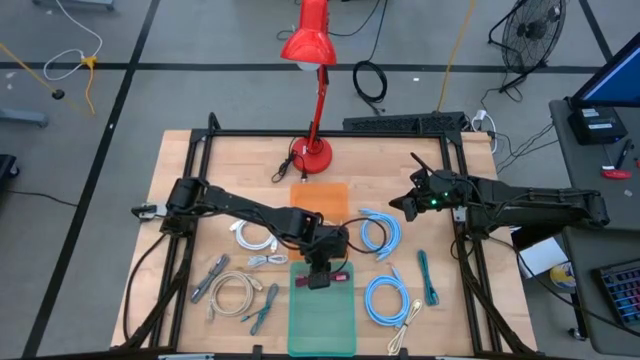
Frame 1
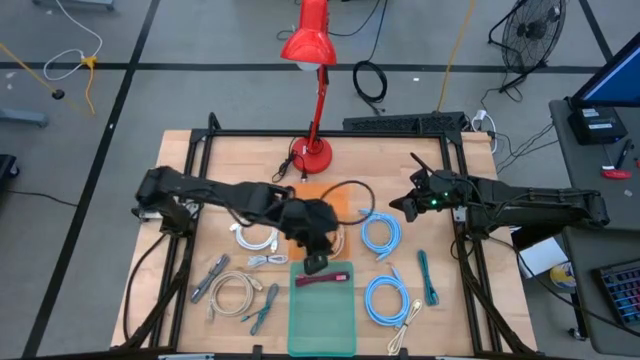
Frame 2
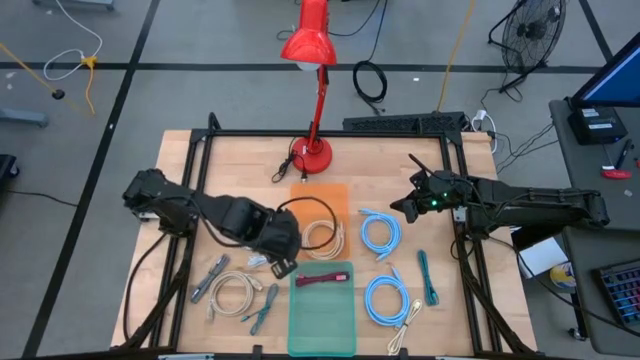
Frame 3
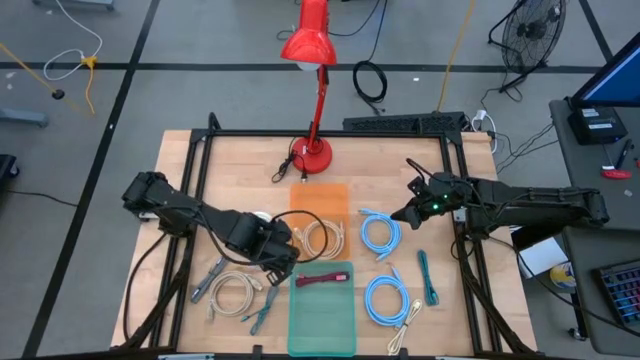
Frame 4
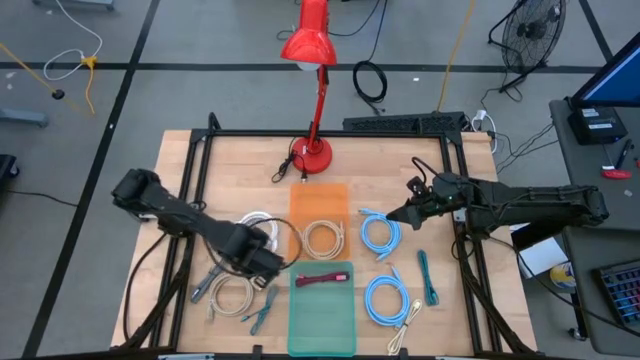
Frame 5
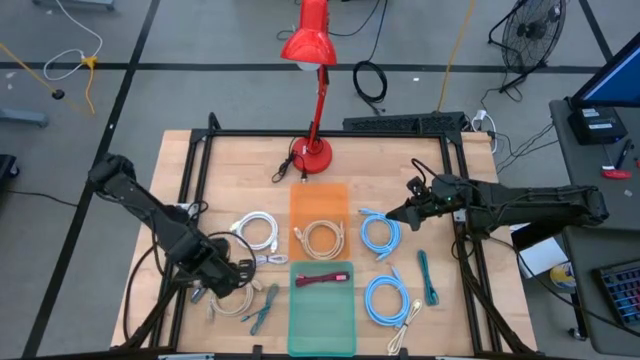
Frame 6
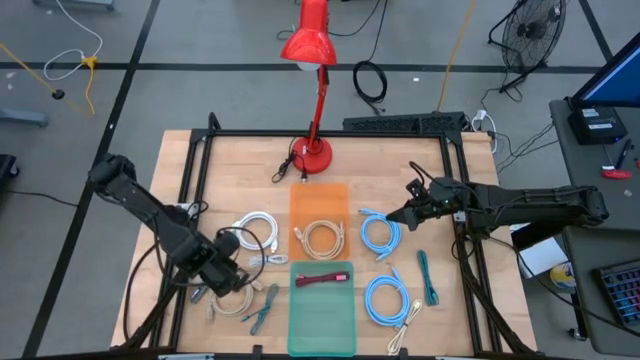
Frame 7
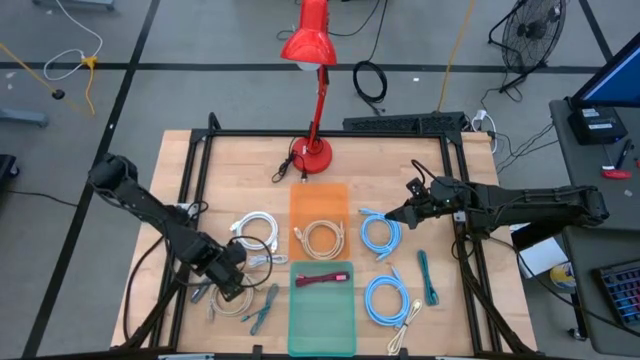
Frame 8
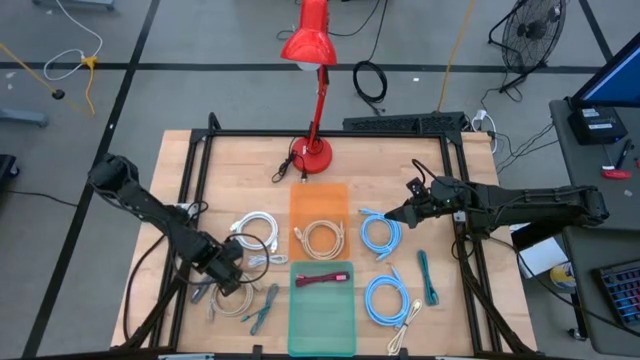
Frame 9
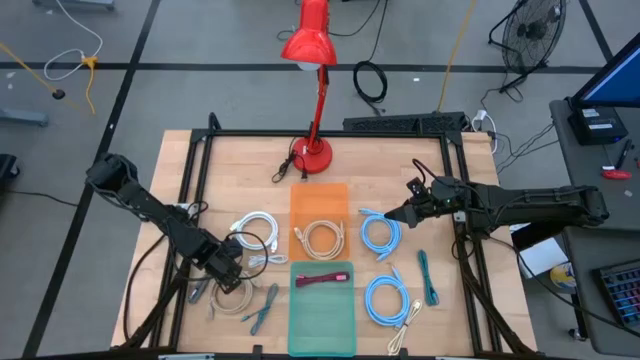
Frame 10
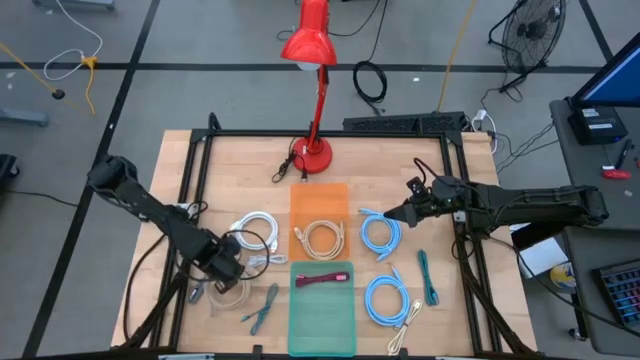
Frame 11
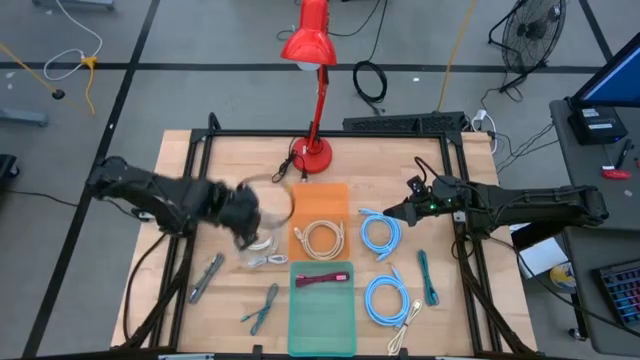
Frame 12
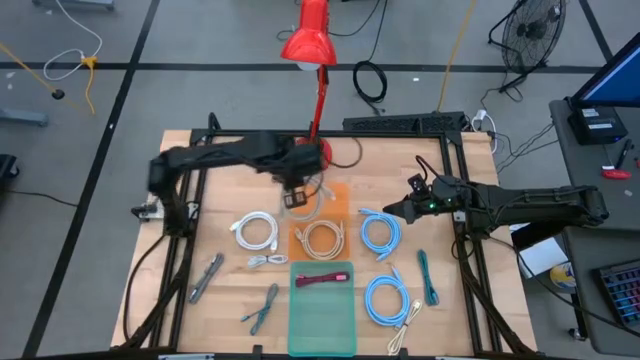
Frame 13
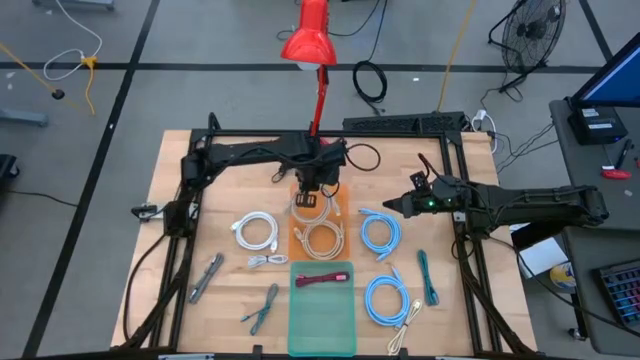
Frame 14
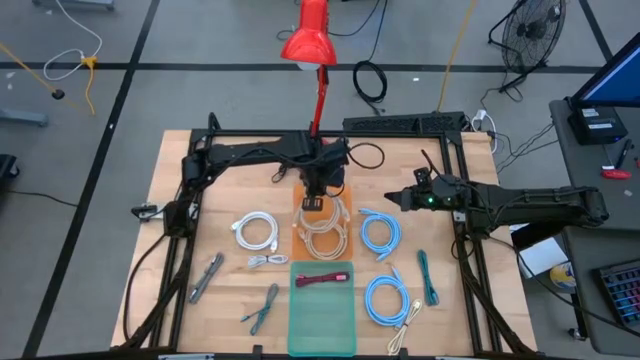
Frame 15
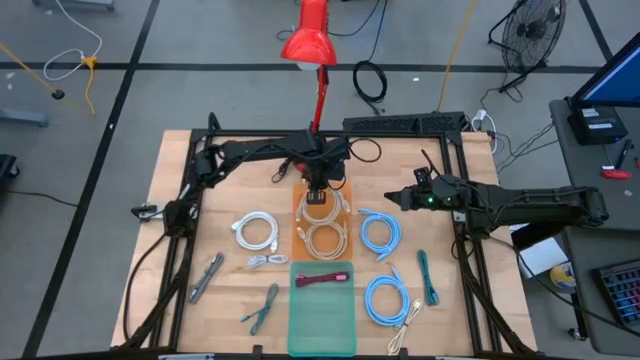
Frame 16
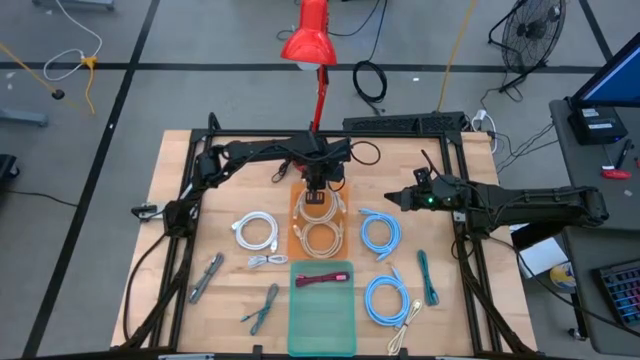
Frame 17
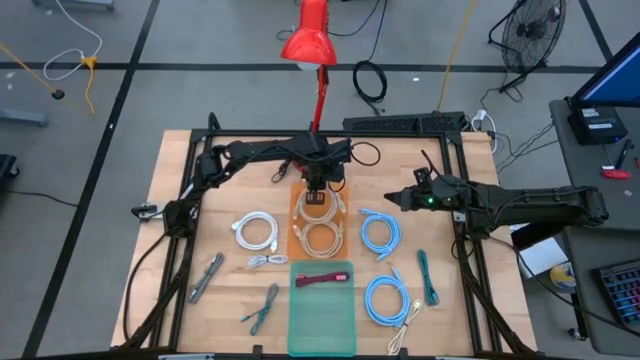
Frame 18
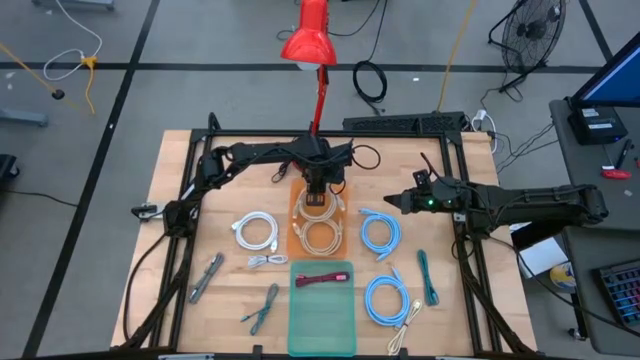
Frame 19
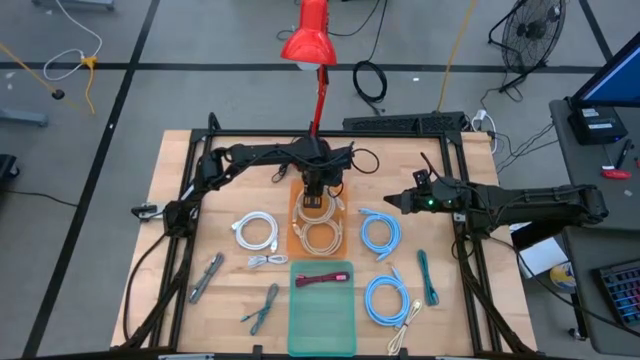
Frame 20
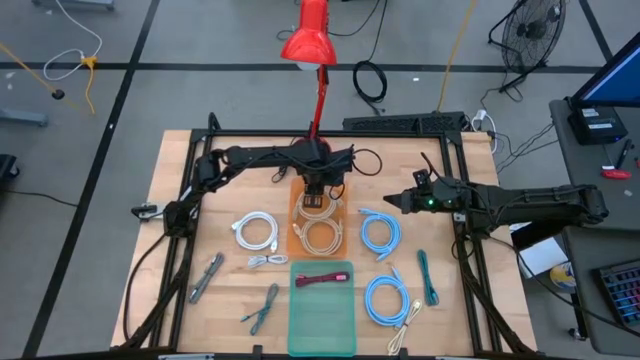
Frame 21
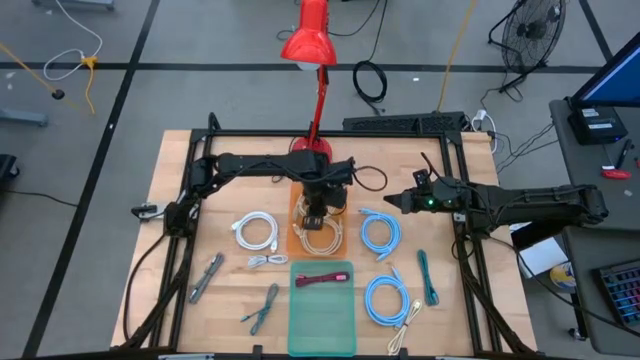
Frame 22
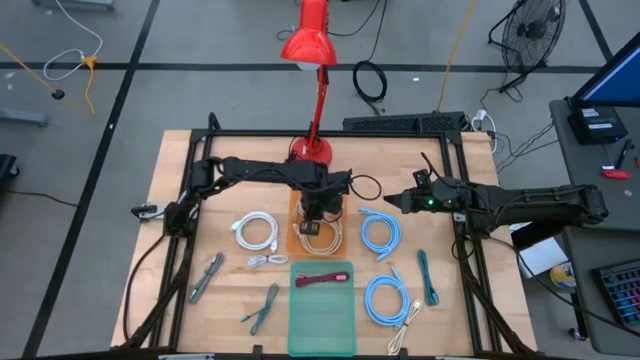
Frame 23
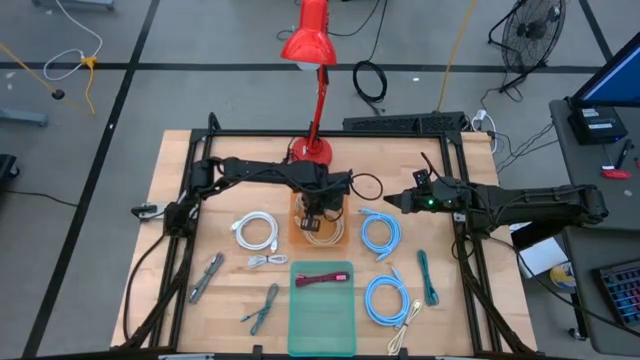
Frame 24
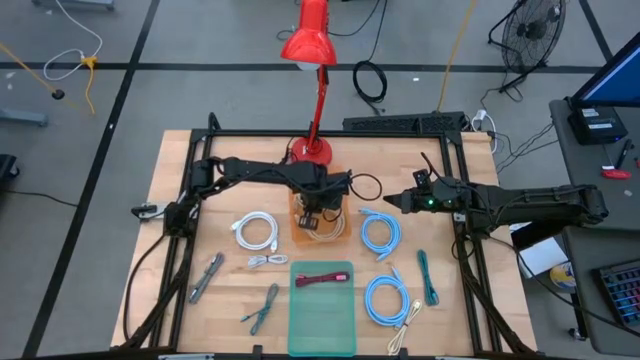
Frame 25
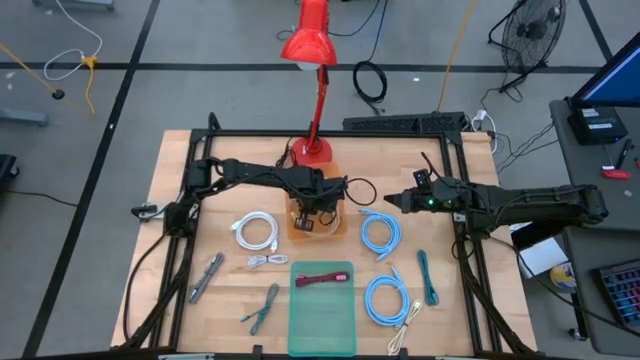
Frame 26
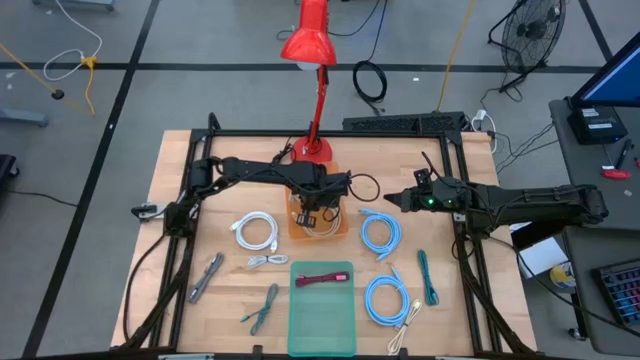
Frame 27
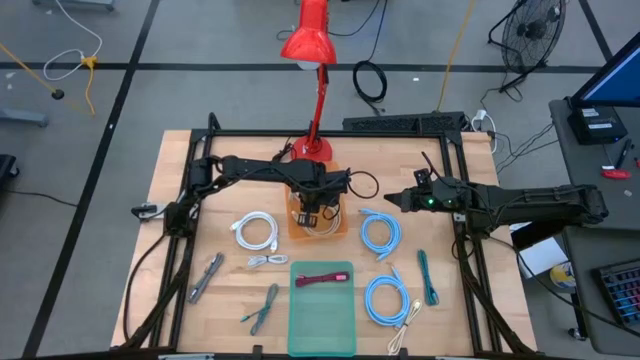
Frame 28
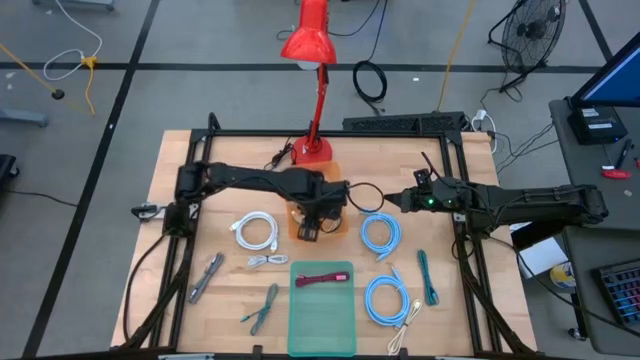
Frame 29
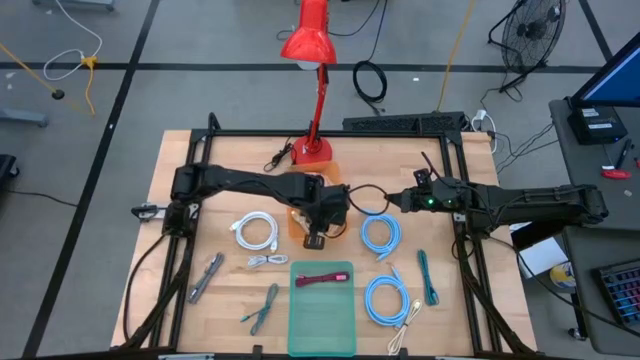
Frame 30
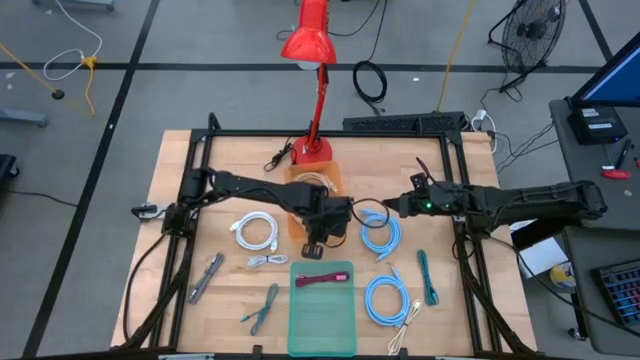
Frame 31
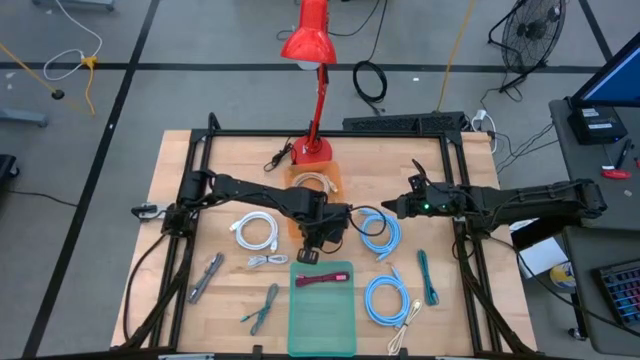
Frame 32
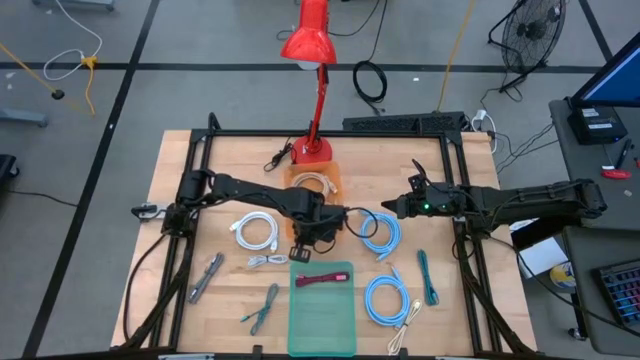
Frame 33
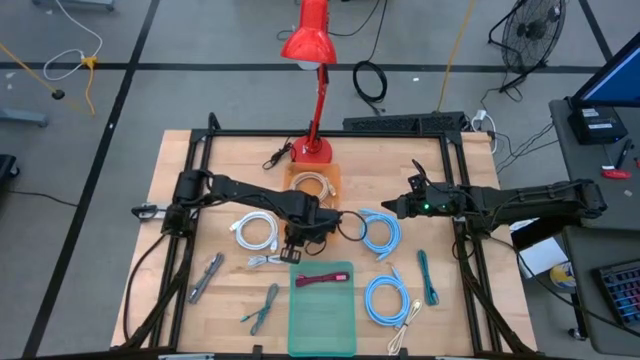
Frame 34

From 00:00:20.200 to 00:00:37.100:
Task: Sort cables
Put the brown video cable into the orange bin

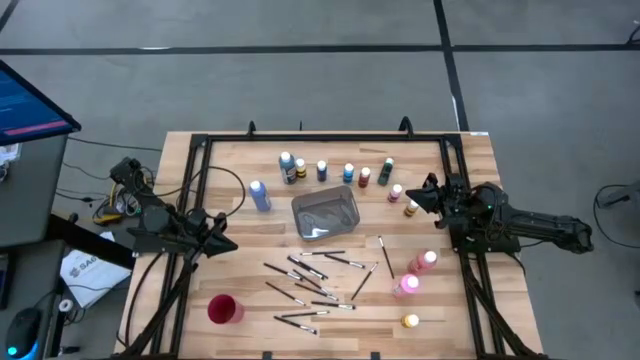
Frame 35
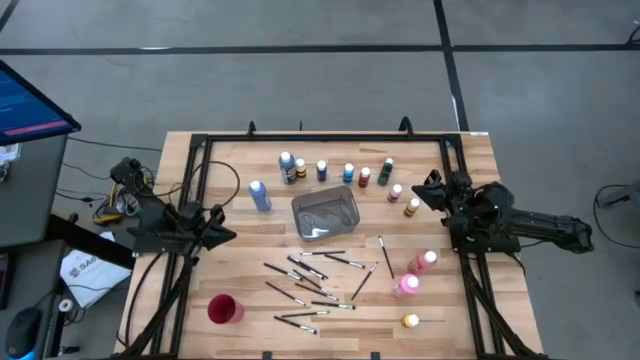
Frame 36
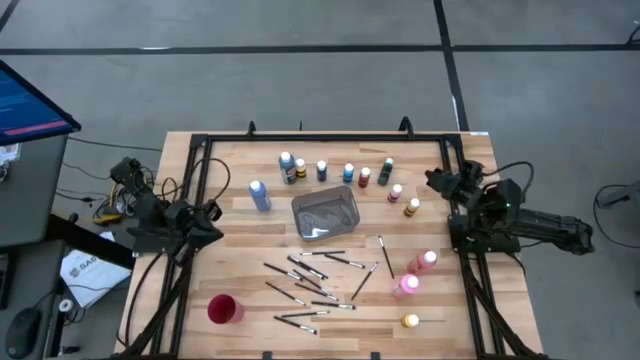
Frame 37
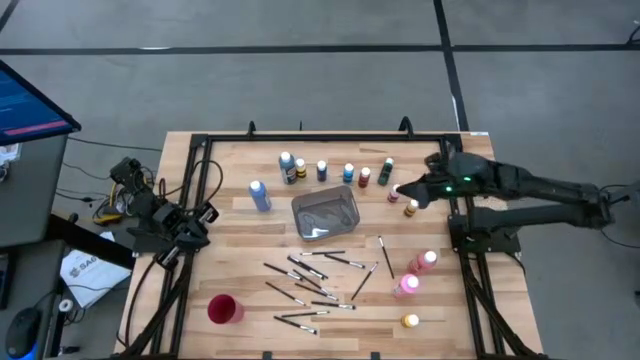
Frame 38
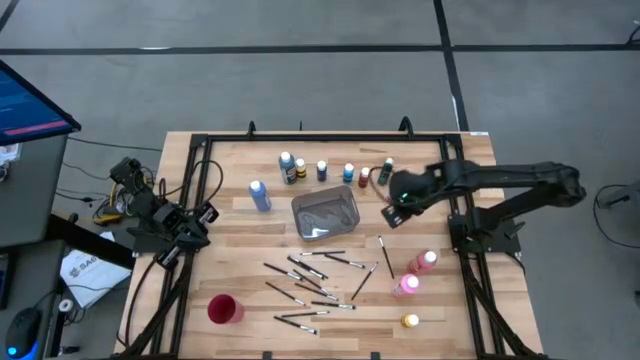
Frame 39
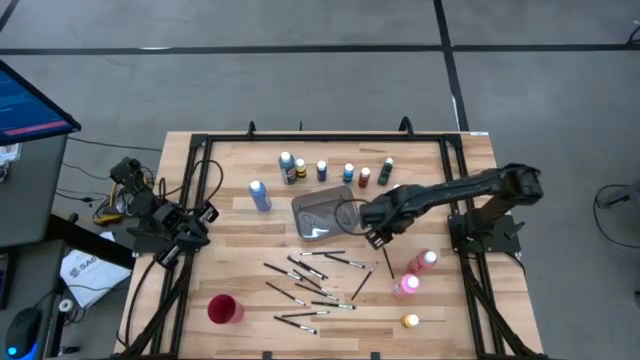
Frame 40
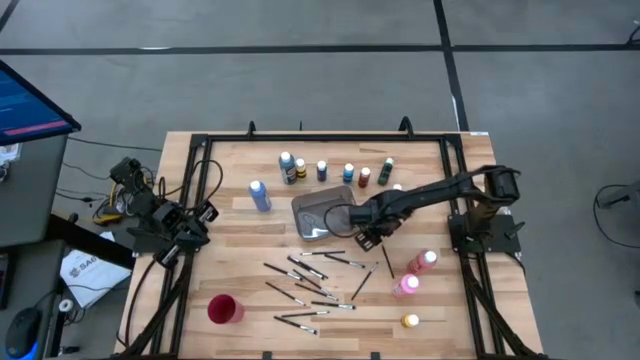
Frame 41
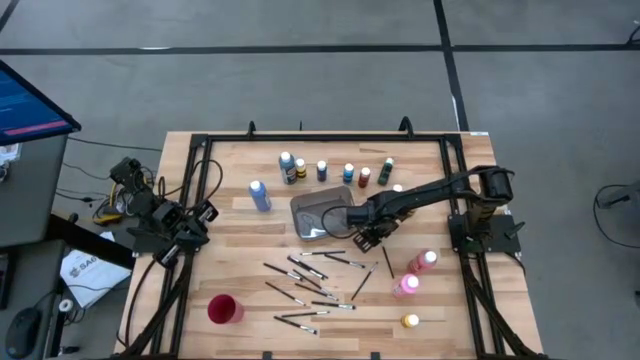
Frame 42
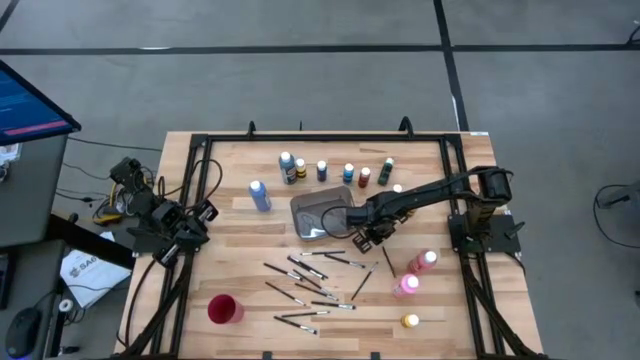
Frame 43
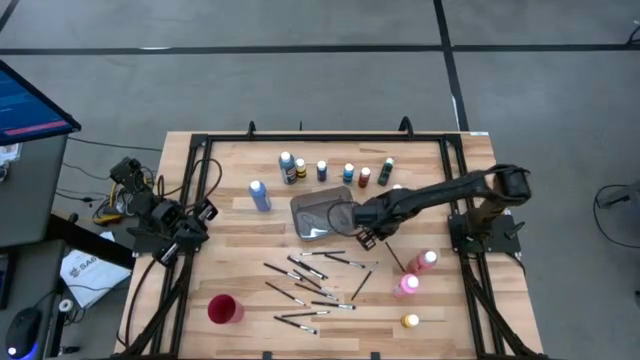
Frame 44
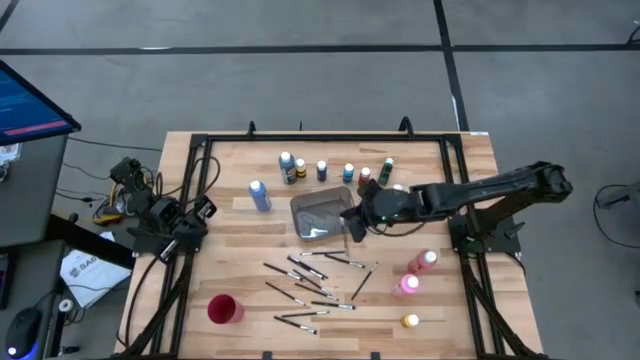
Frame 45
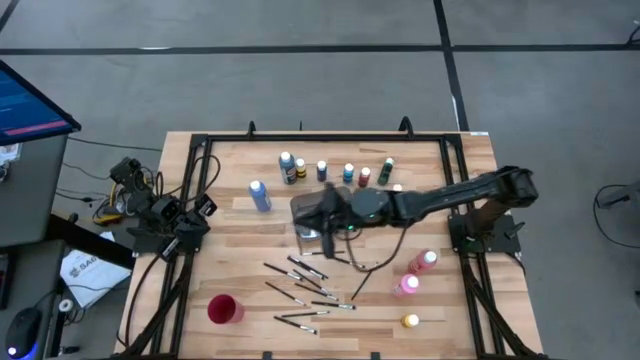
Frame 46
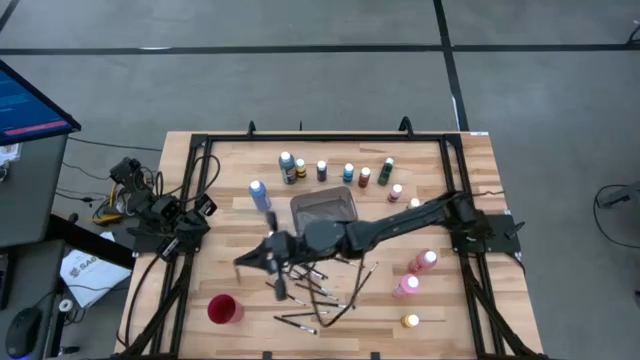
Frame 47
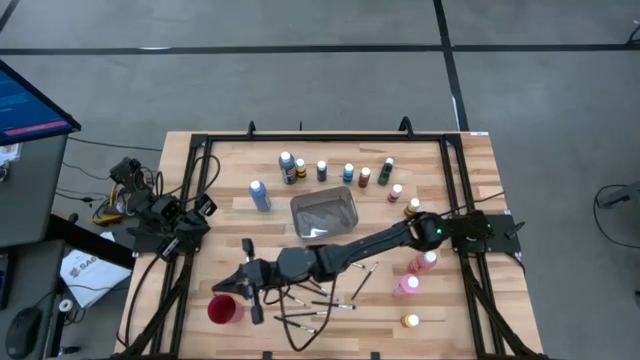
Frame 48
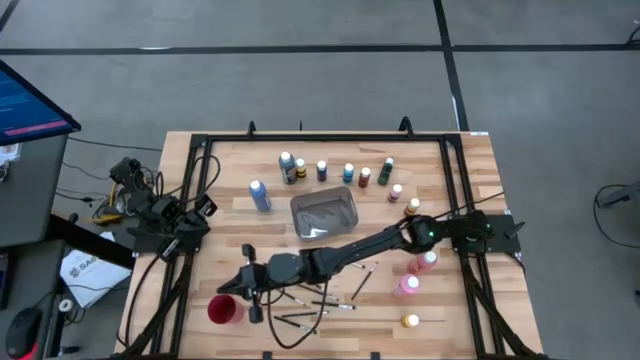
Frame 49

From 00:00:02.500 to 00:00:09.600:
Task: Pick & Place Paint Supplies
Put the silver paintbrush into the red cup
